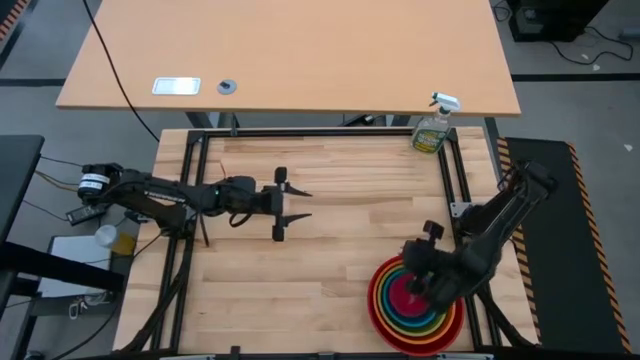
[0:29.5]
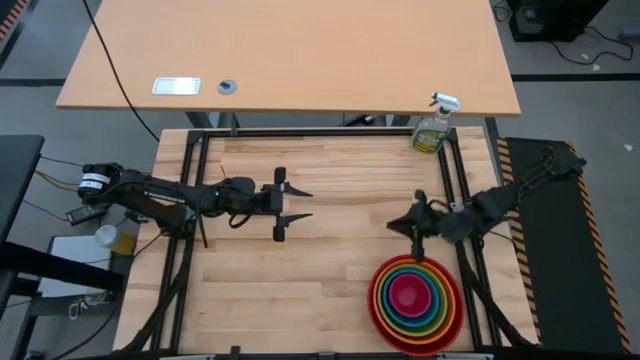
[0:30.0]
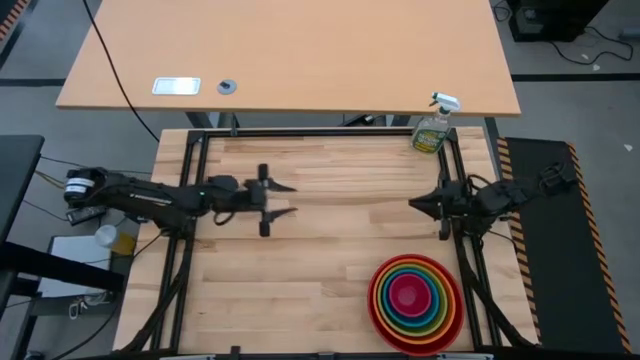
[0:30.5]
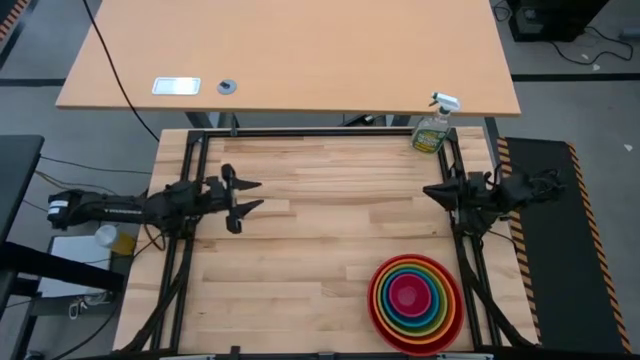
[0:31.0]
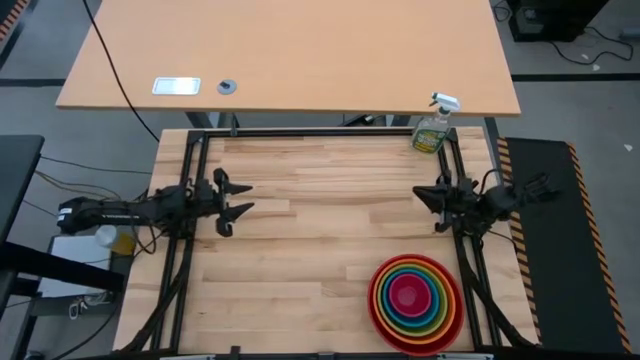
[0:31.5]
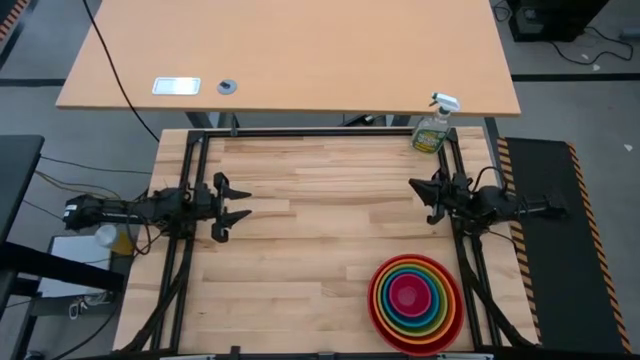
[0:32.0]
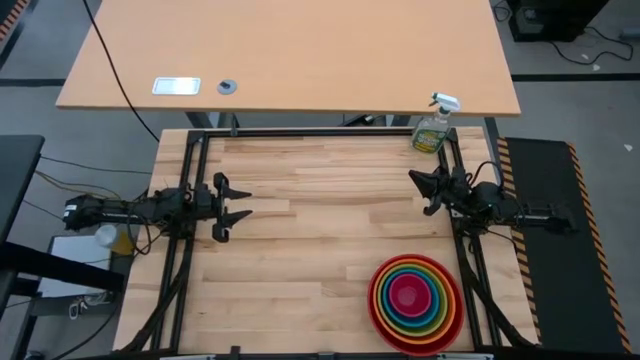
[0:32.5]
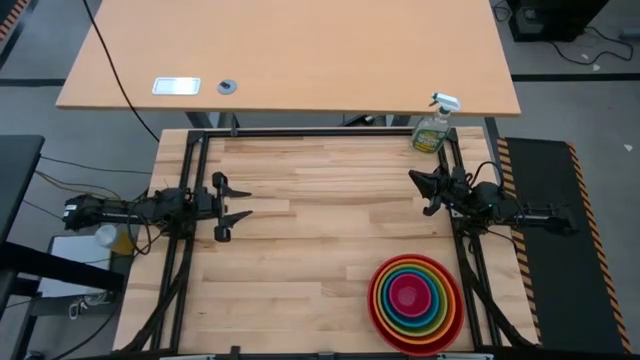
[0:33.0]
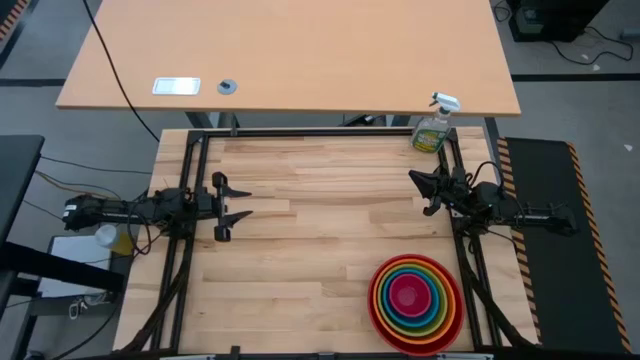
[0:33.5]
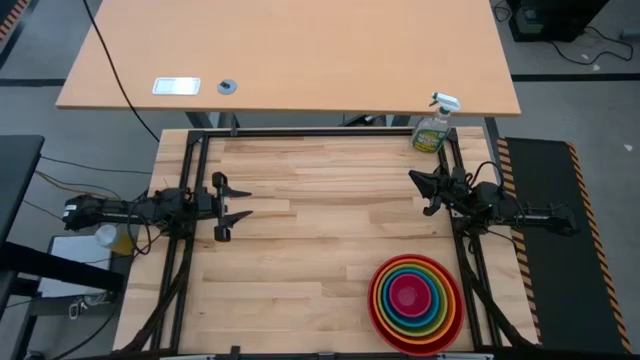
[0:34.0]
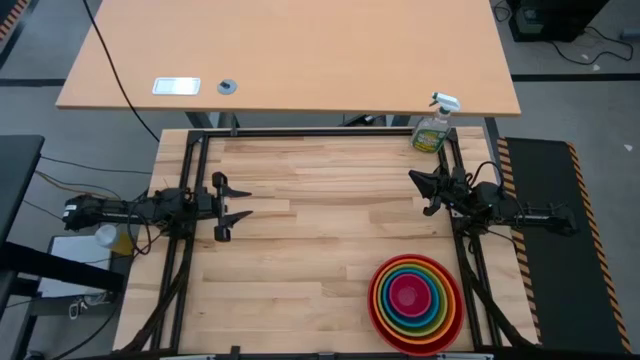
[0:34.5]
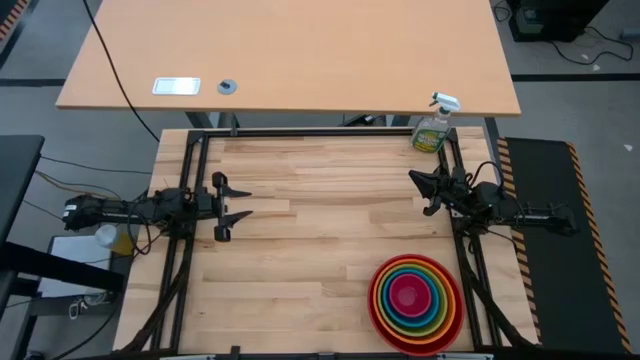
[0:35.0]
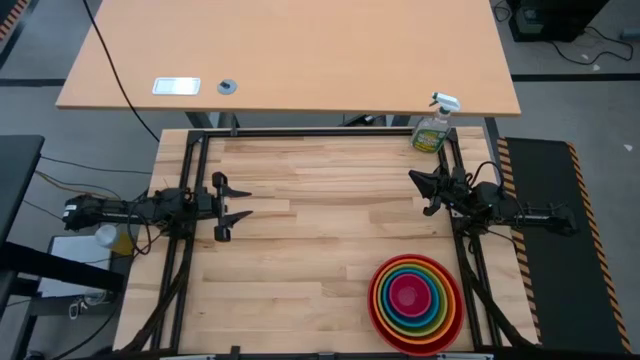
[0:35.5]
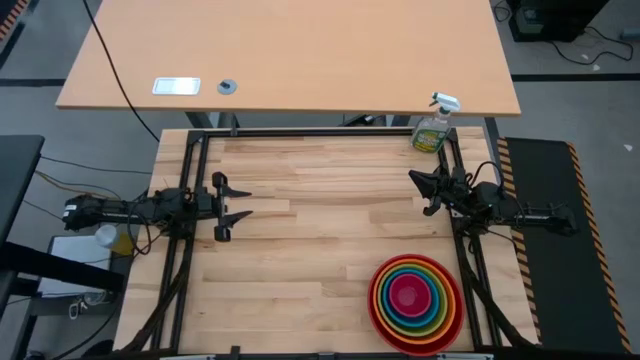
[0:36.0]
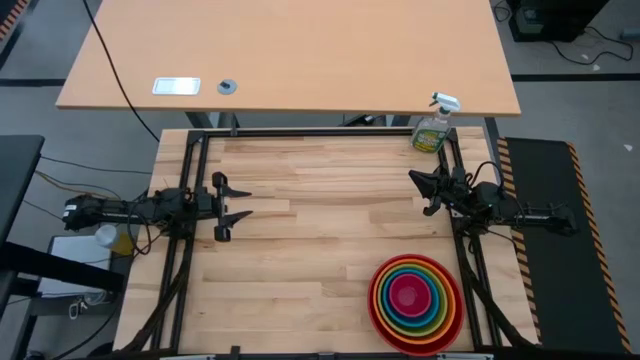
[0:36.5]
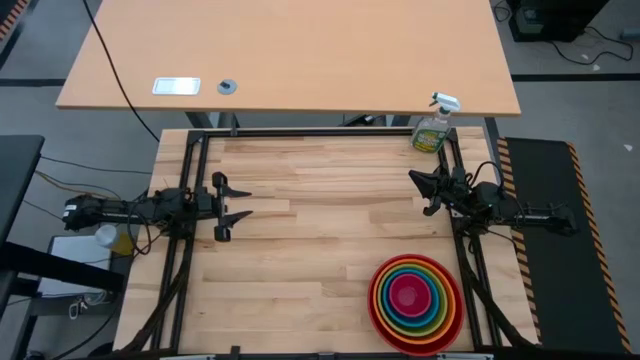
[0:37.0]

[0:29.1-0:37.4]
Return to Home Position

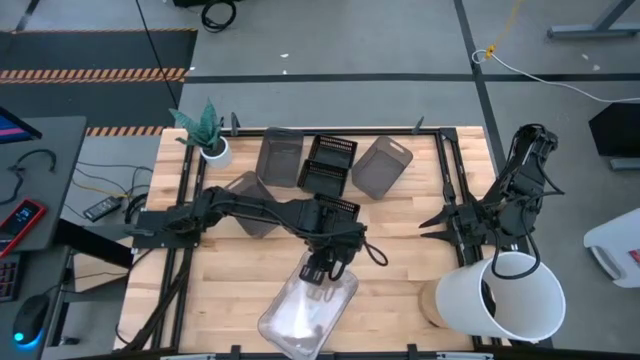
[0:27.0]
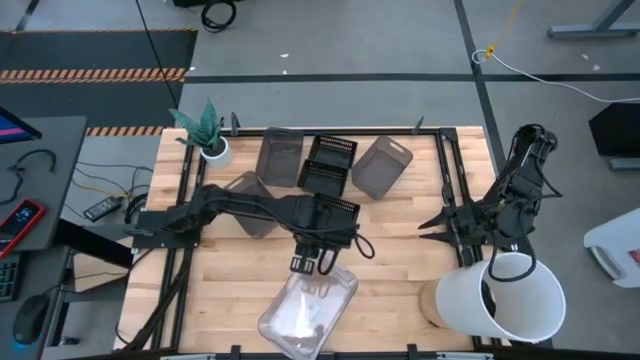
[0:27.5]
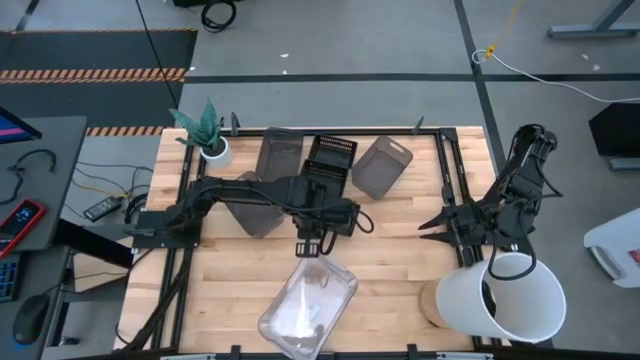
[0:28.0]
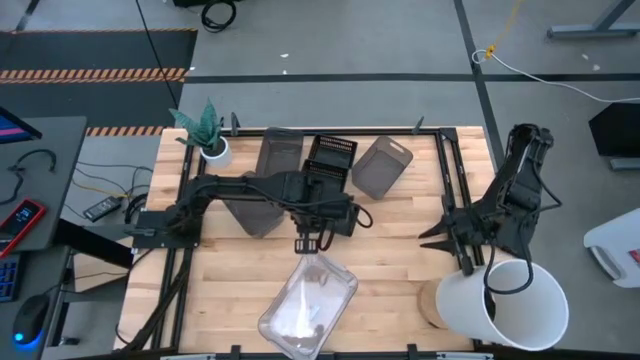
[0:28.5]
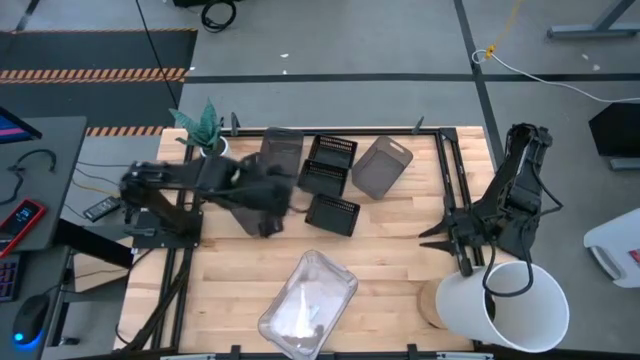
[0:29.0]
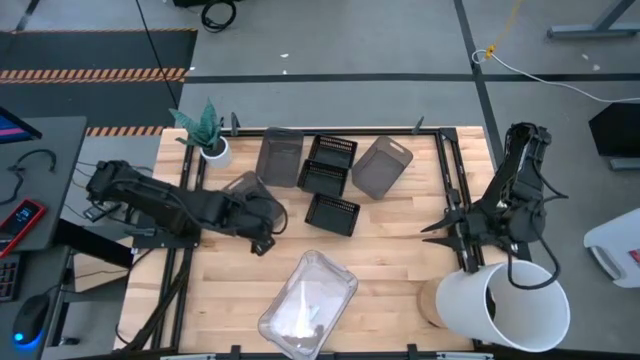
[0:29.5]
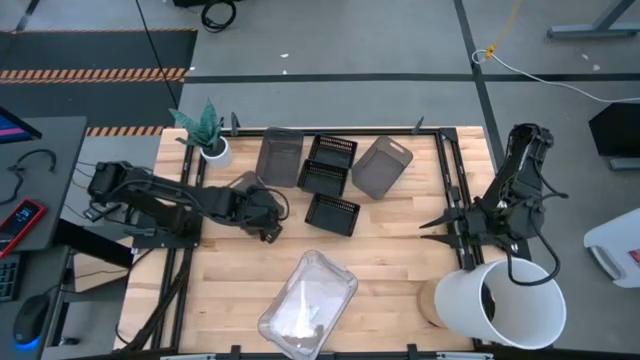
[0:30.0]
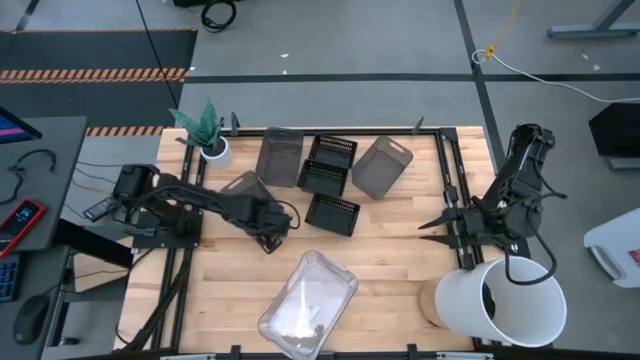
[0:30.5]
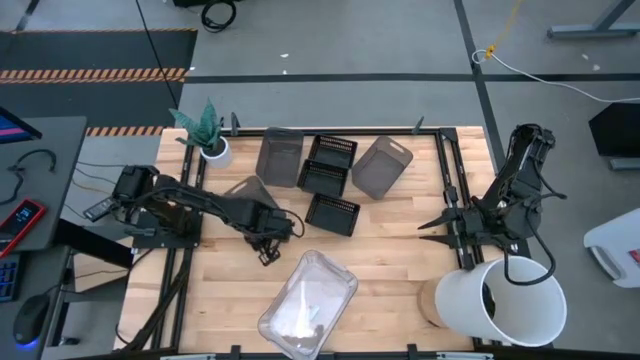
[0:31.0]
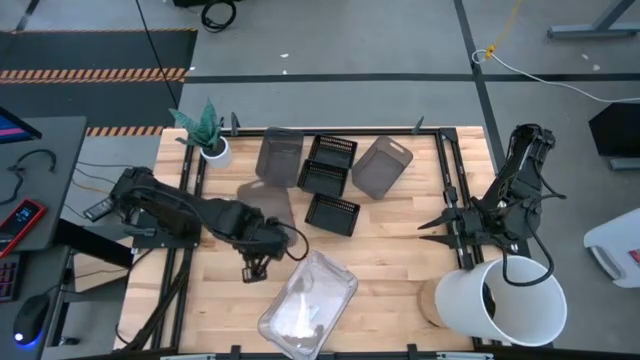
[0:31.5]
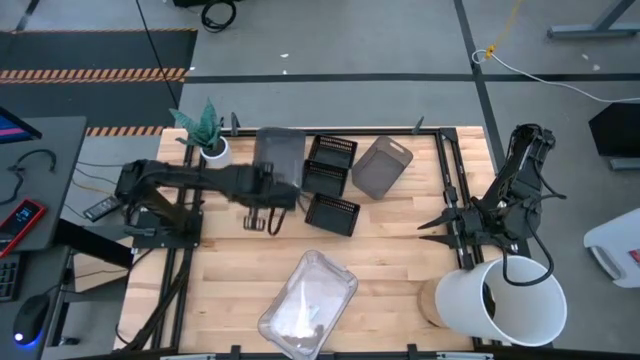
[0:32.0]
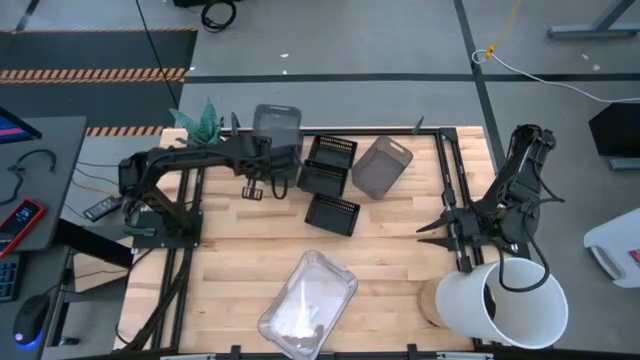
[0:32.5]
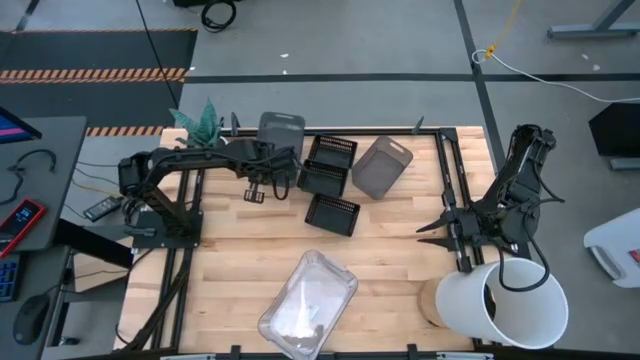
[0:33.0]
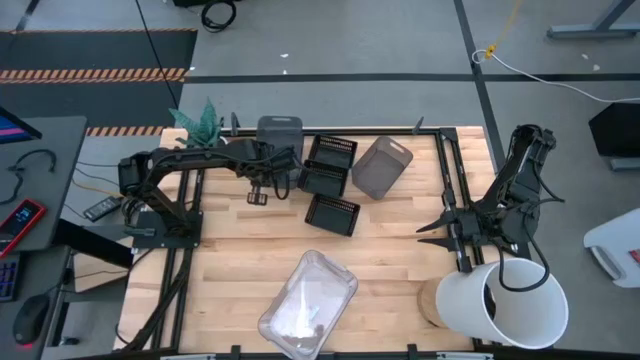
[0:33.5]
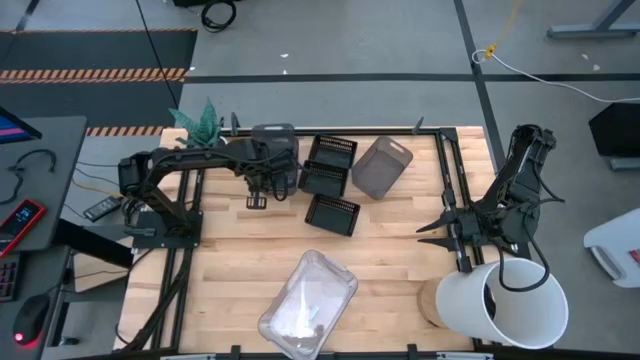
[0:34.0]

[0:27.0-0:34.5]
Stack the bottom black bin on top of the left black bin

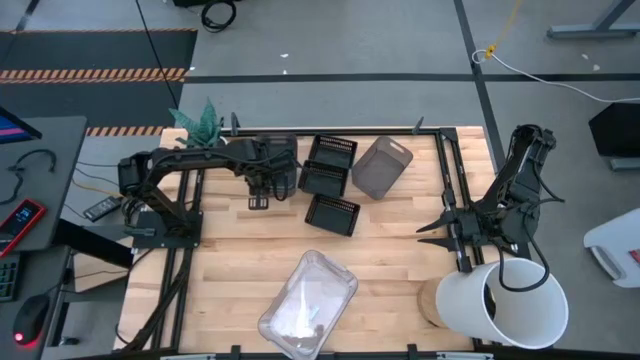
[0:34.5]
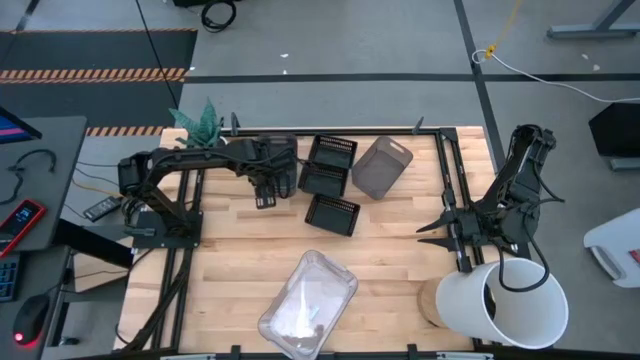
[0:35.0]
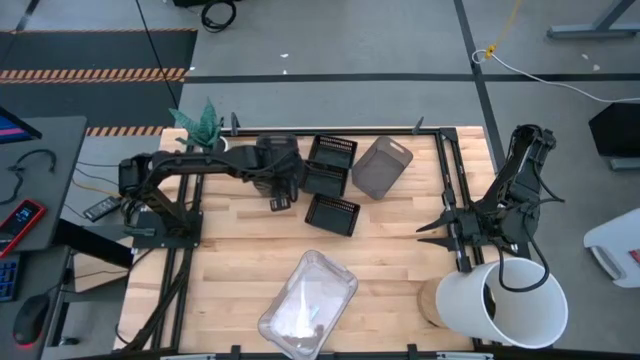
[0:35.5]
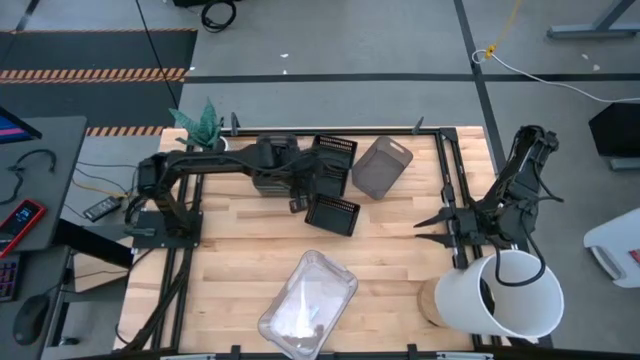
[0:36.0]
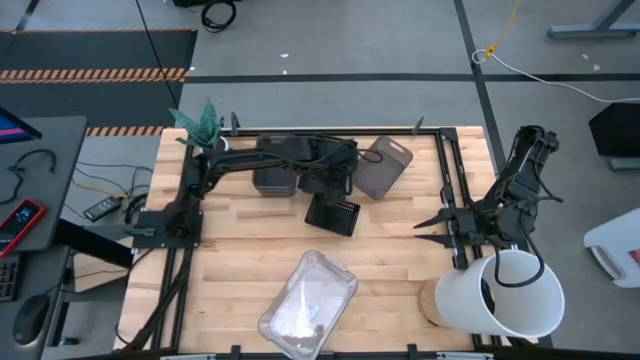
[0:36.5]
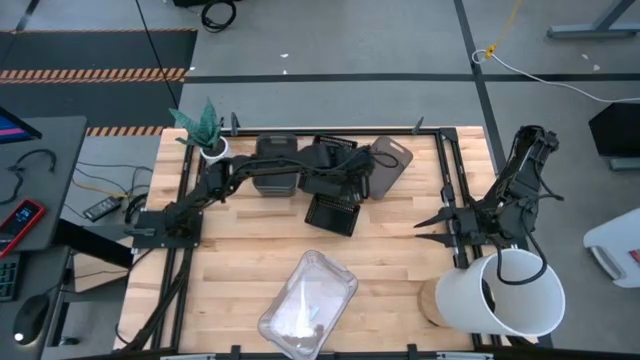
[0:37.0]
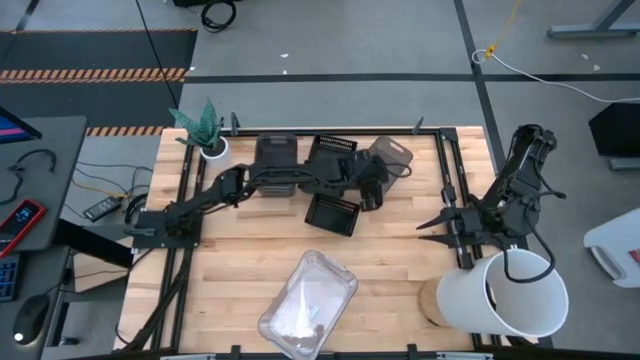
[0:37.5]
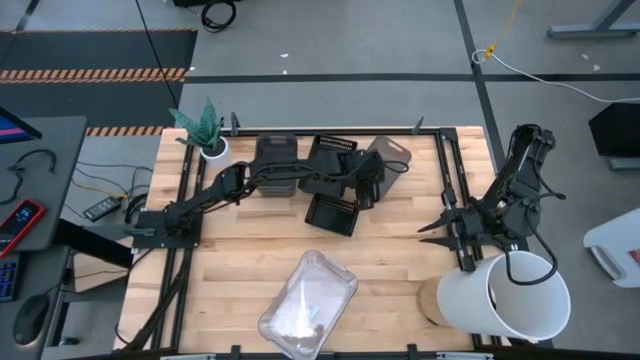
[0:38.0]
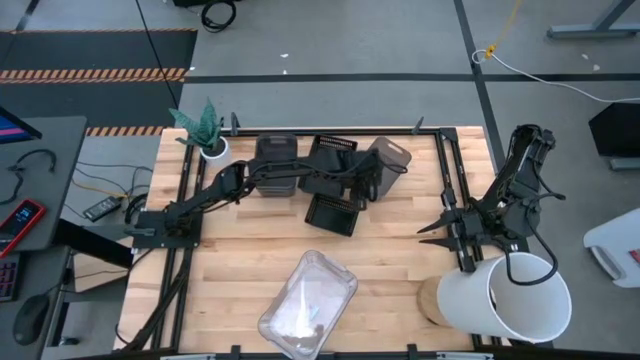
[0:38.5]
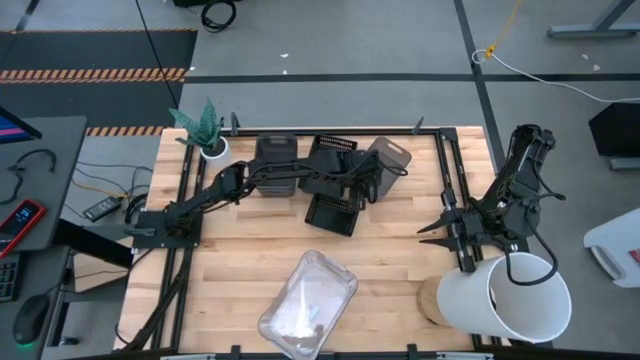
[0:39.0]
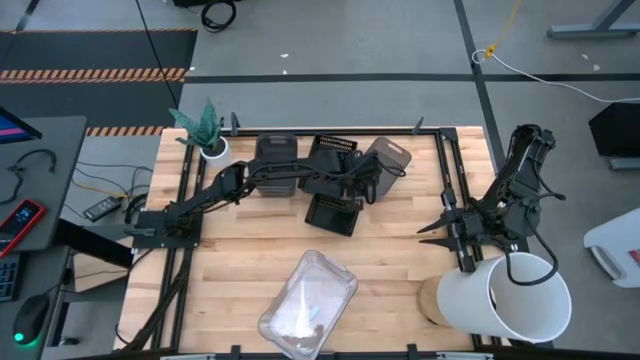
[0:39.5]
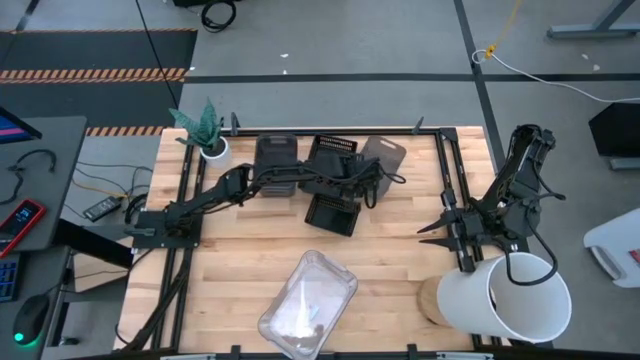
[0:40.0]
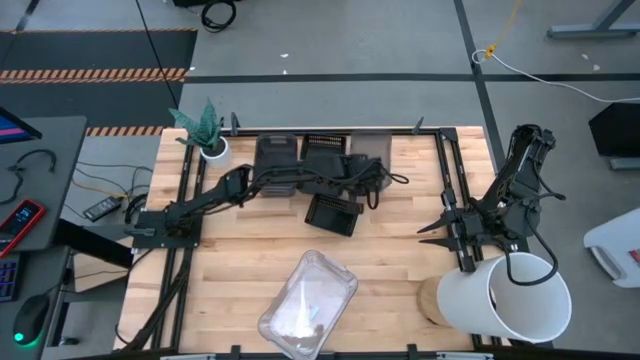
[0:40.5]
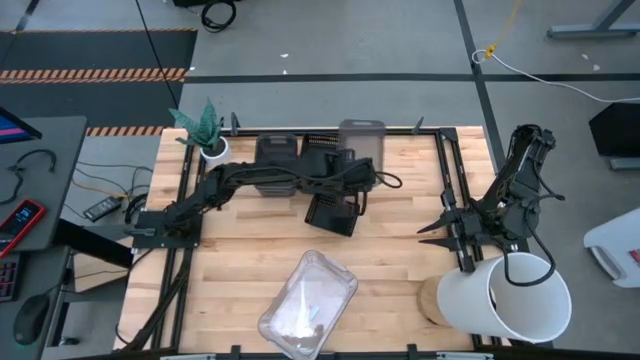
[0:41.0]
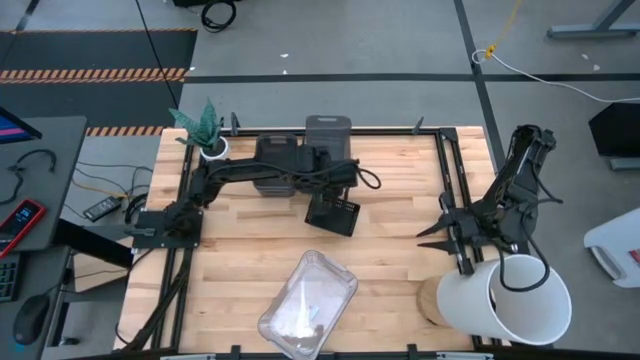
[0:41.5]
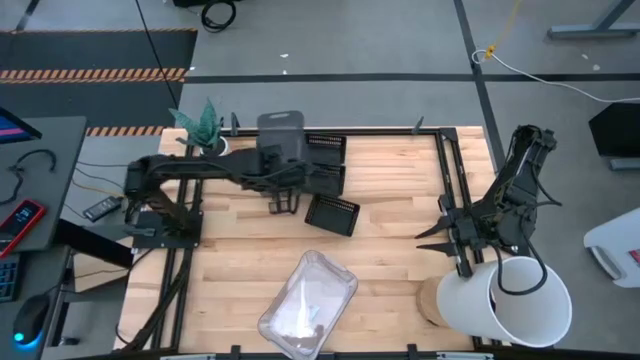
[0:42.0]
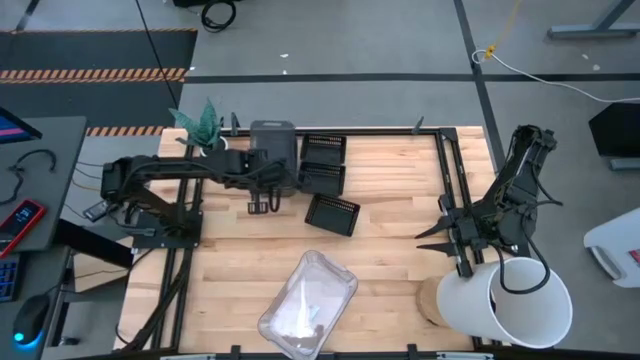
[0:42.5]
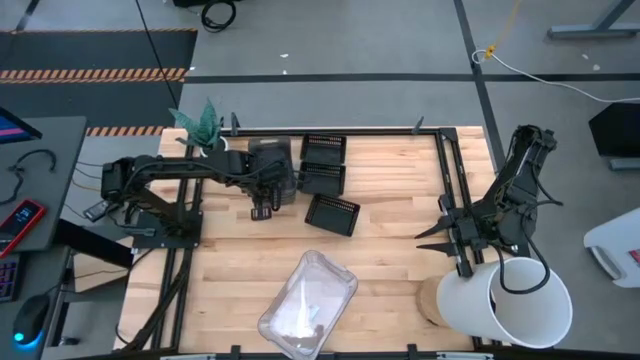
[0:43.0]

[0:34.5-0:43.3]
Stack the right black bin on top of the left black bin
